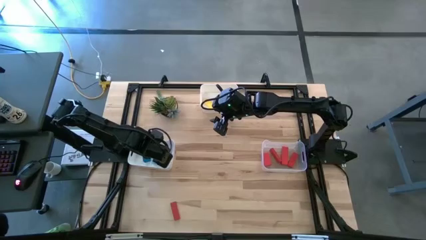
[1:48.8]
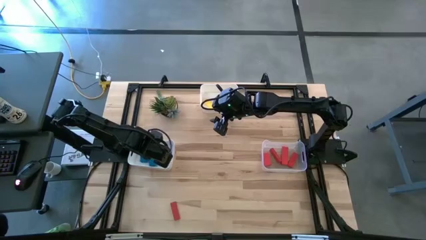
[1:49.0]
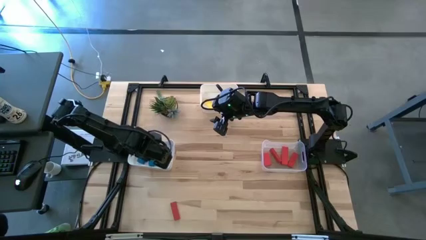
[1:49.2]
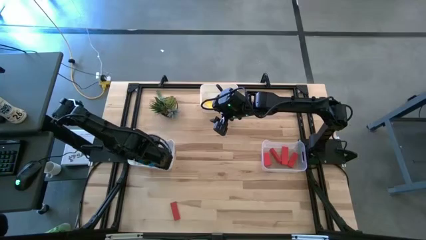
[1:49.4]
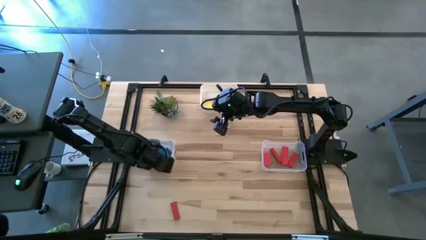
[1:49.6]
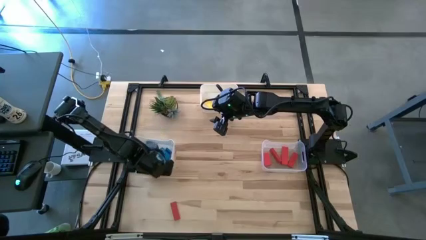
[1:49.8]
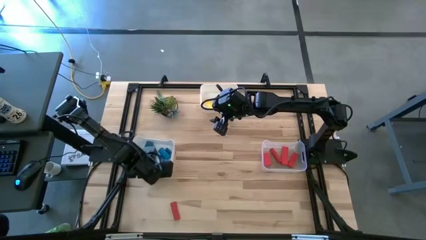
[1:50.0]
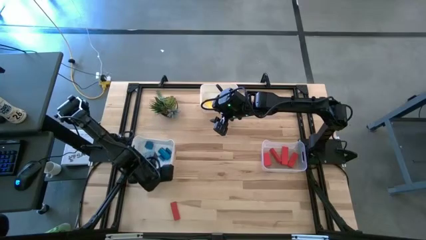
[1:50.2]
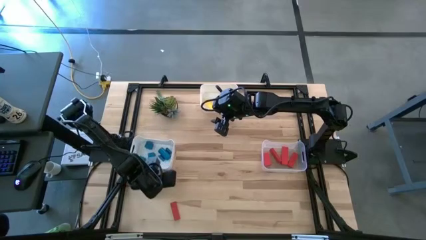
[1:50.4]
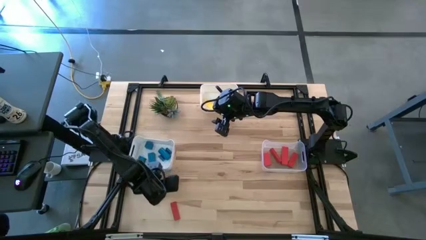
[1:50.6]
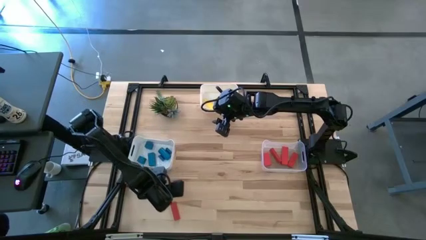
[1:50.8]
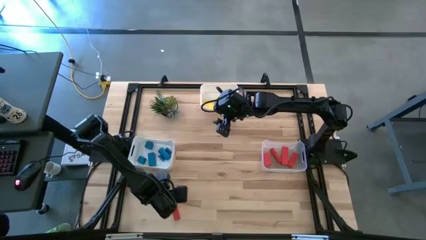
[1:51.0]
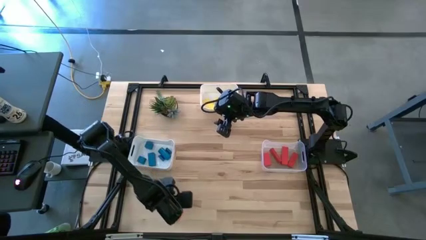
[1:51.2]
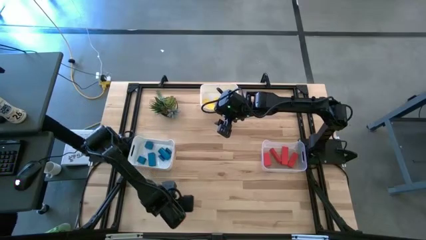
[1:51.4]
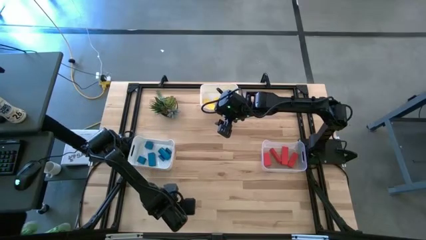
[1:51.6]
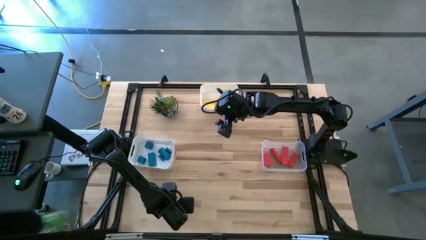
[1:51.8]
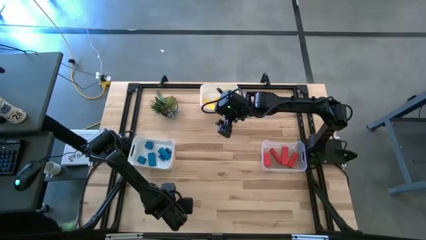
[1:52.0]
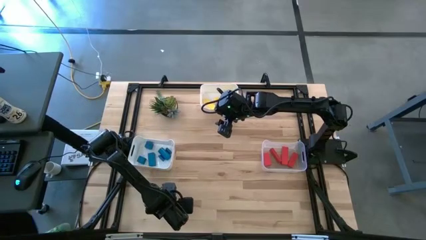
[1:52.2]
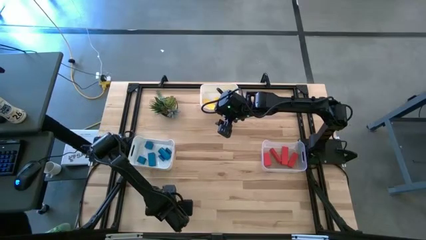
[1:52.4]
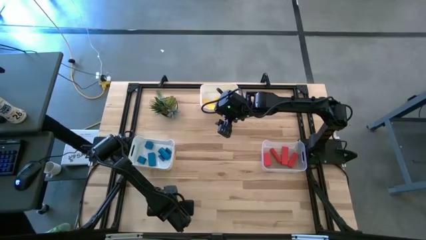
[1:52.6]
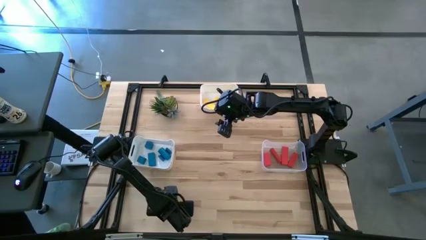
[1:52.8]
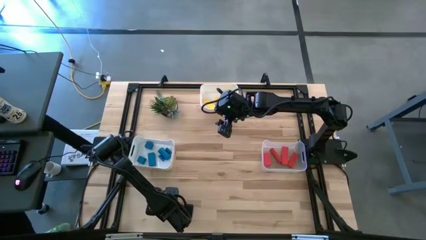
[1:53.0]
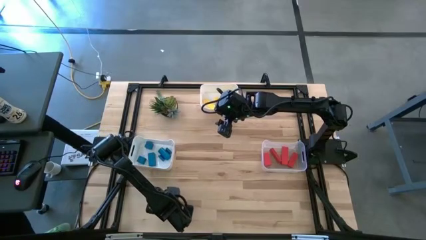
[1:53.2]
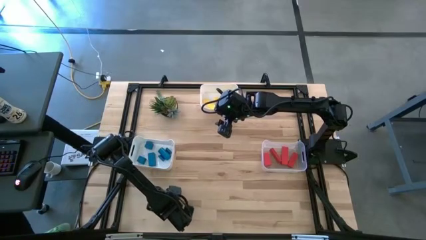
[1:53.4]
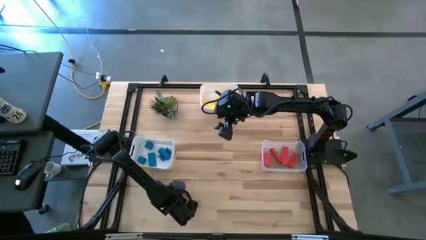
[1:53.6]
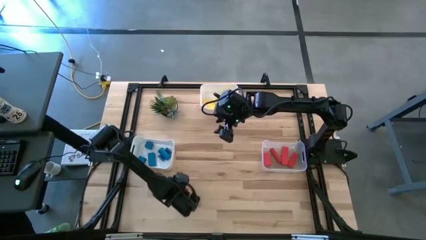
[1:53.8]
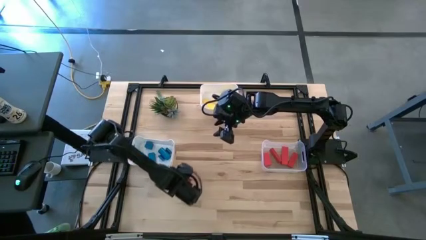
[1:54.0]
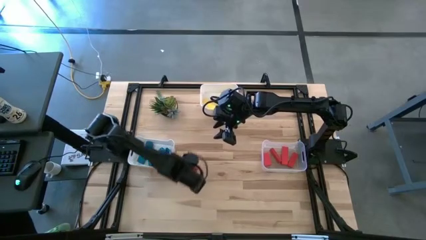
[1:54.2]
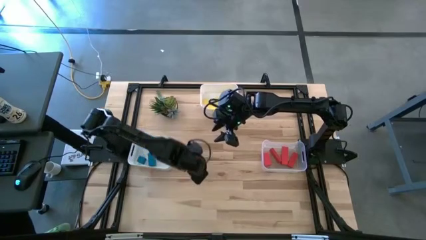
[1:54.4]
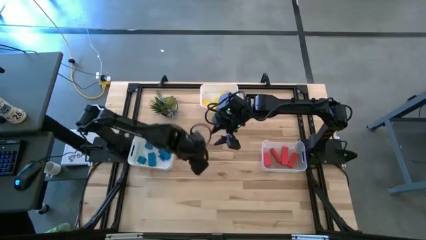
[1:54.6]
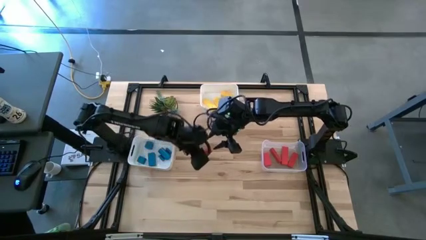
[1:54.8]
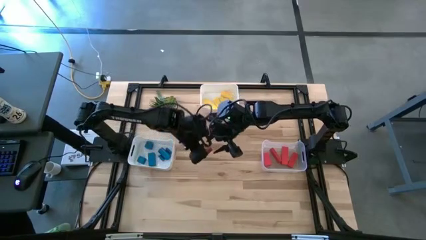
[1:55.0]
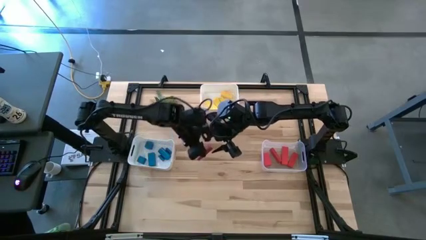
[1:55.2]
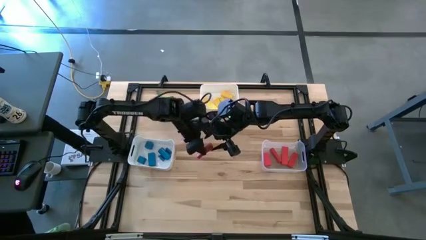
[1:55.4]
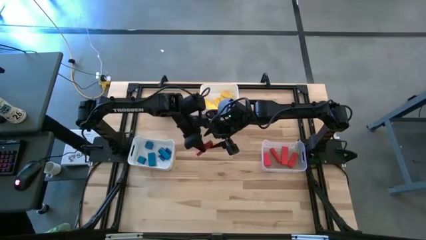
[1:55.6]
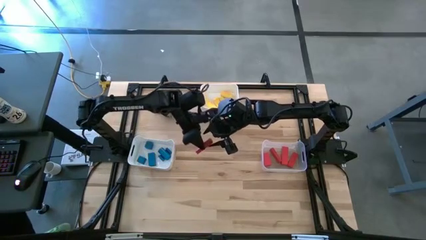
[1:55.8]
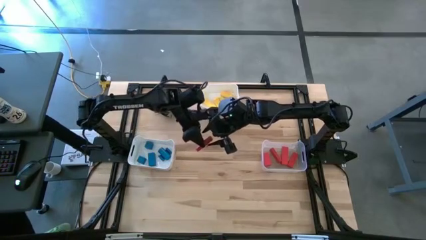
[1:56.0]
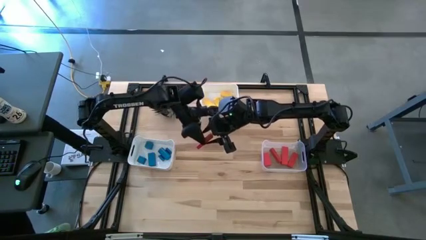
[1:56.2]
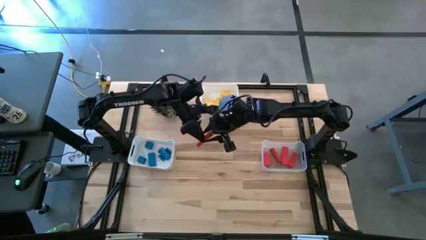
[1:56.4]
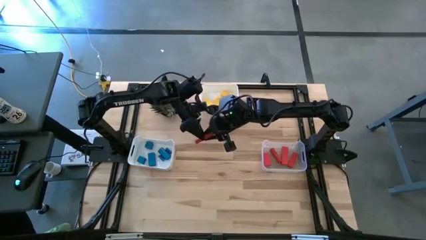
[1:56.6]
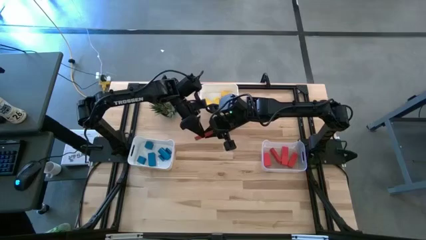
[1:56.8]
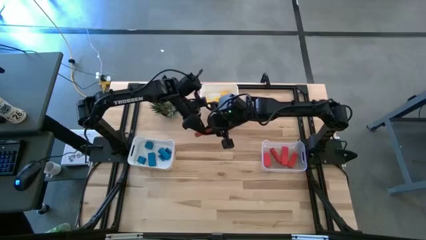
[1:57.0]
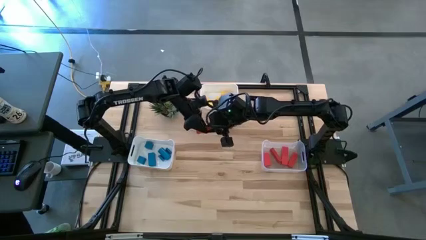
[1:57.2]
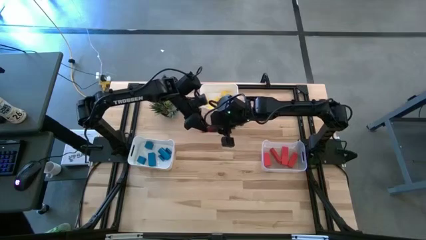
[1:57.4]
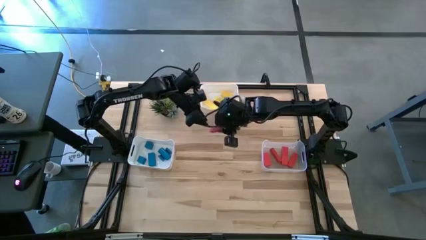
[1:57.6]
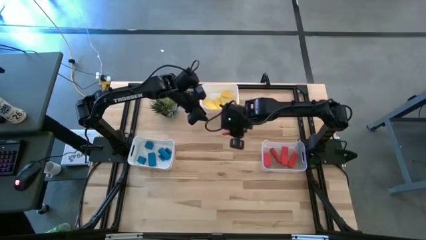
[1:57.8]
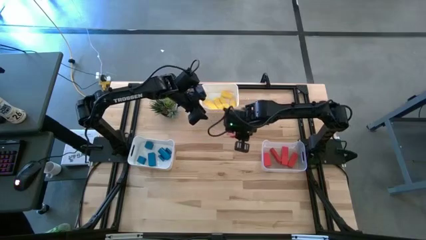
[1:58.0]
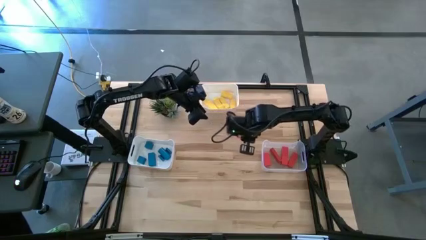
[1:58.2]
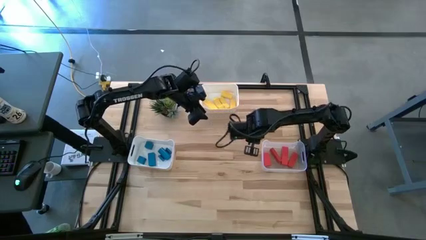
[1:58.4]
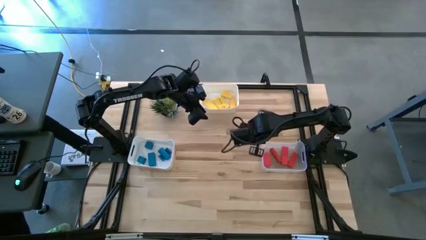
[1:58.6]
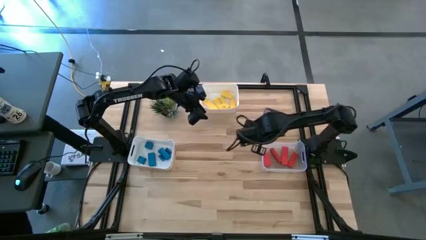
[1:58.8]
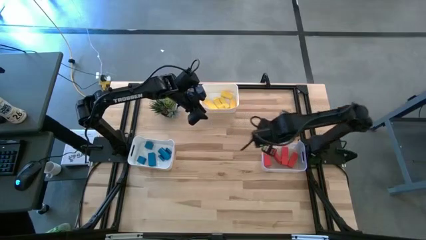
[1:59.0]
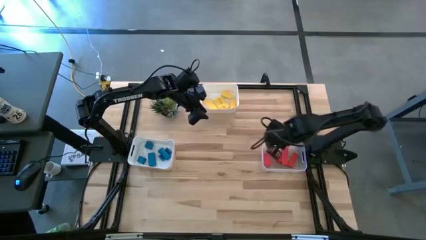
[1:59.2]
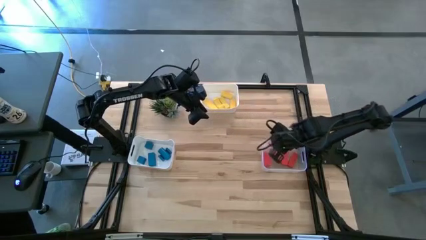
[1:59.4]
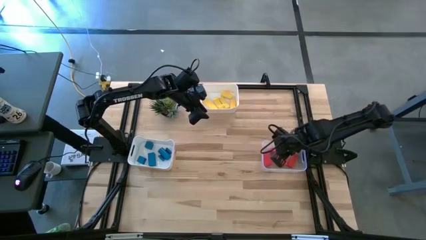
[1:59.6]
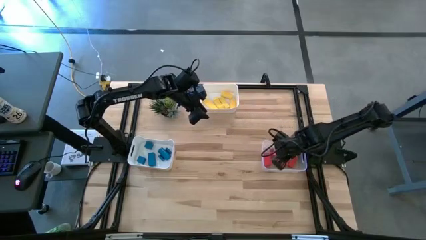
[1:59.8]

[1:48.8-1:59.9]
Task: Sort & place blocks by color
Put the red block into the bottom right transparent bin

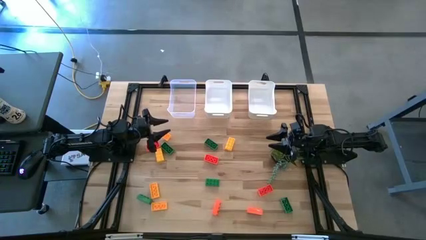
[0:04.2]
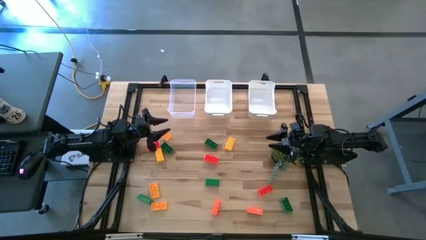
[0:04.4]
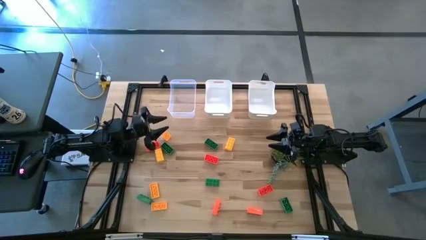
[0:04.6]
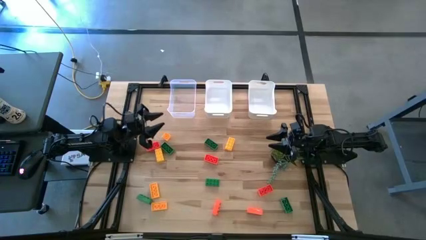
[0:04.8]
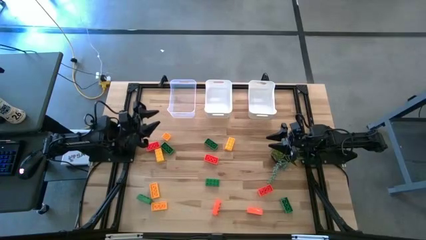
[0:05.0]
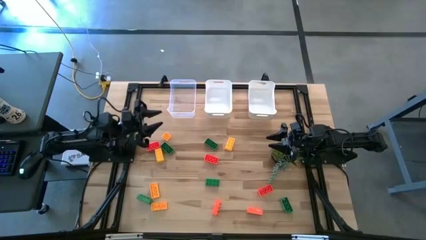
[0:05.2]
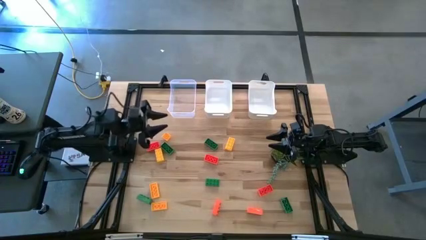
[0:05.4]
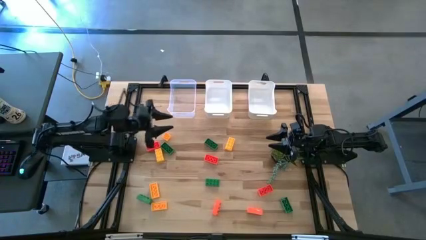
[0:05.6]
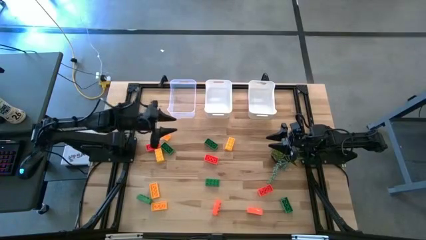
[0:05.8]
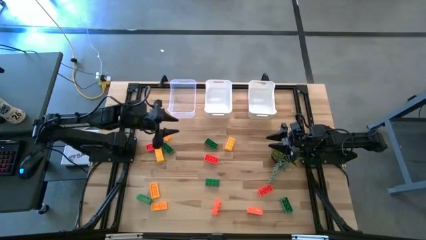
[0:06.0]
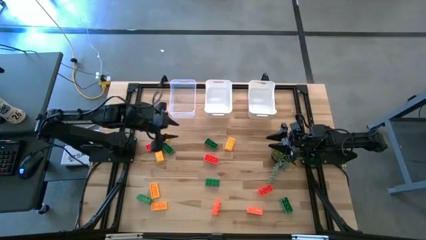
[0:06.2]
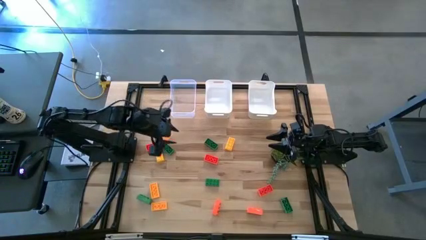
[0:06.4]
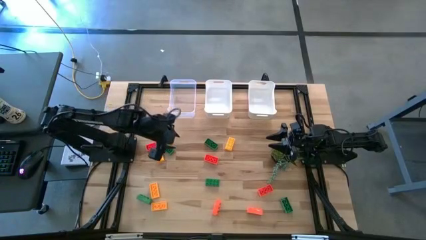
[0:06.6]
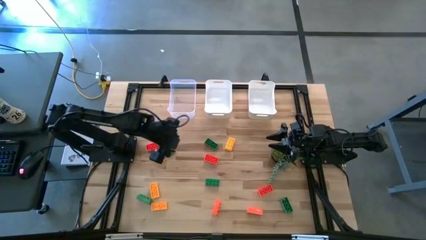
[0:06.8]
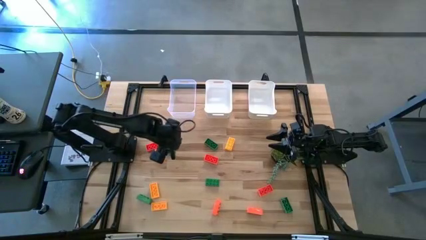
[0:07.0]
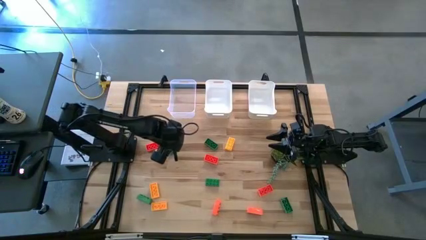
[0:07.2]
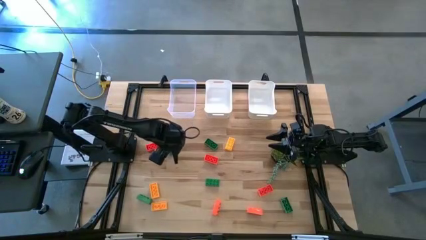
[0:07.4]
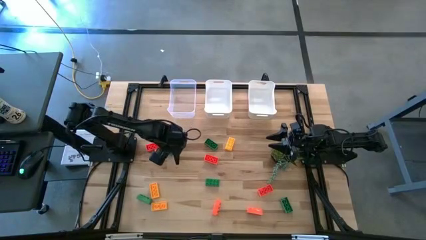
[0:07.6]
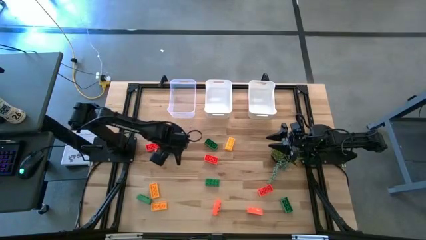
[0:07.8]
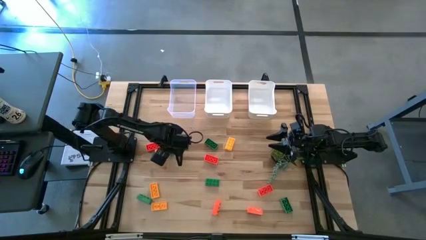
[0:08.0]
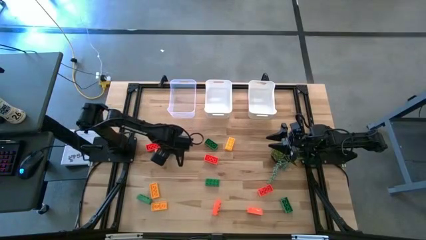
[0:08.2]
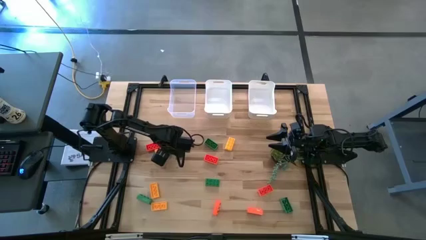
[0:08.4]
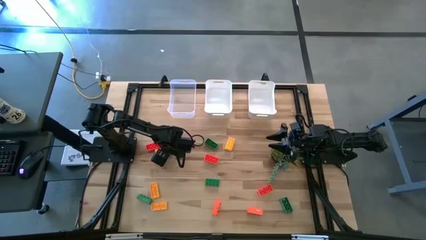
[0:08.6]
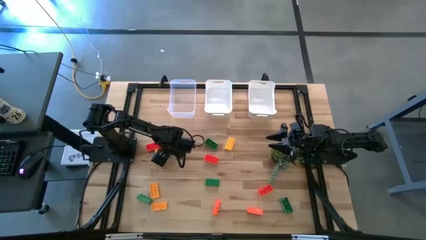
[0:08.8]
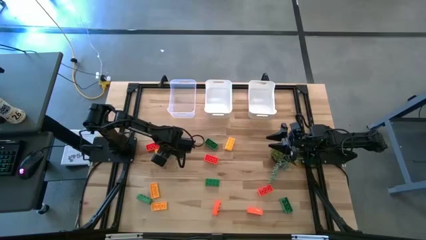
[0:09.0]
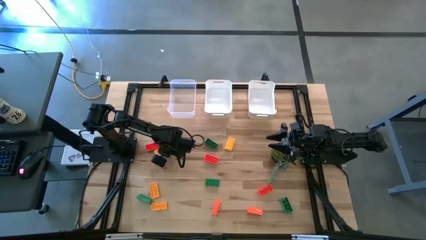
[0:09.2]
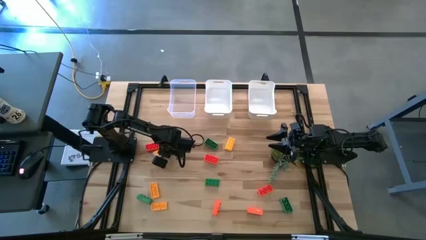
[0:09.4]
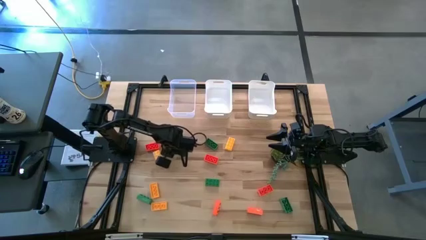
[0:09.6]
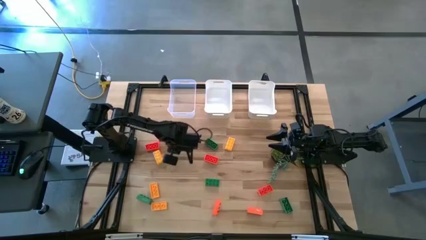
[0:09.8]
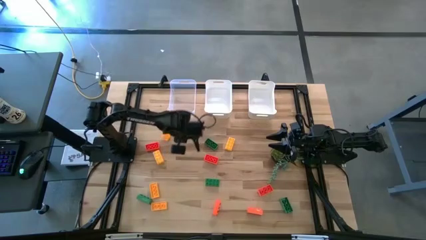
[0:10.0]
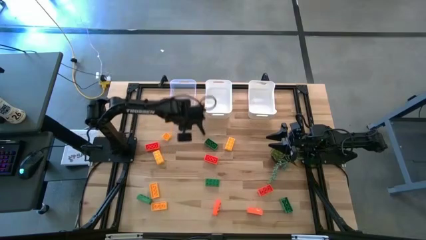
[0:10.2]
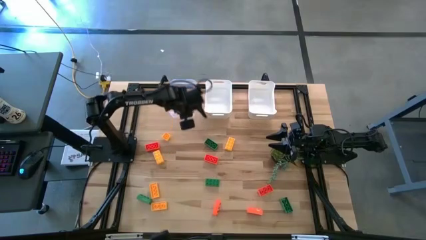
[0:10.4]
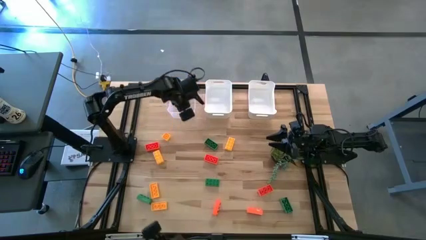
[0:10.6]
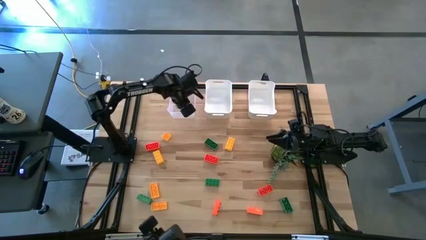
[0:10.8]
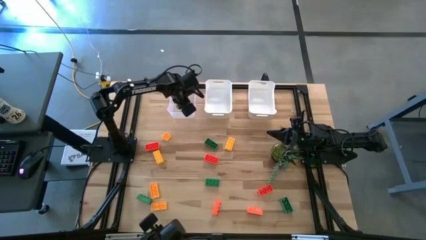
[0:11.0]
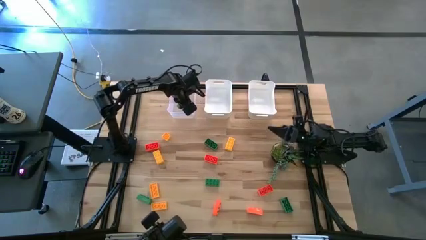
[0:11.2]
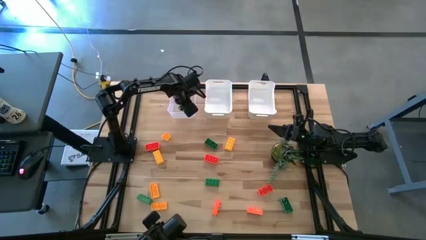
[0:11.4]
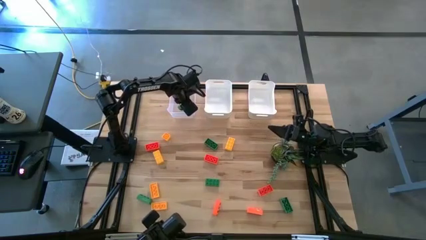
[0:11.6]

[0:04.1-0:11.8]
Task: Sort & place blocks by color
Put the green game piece into the transparent bin
